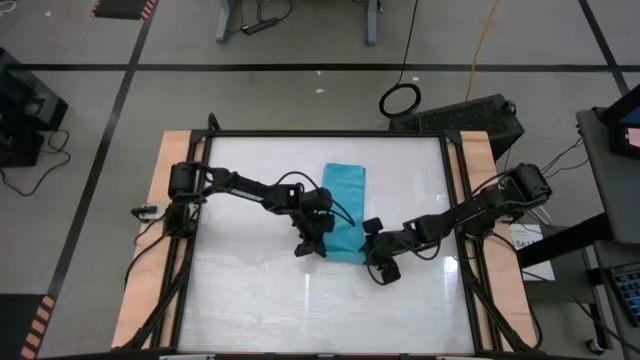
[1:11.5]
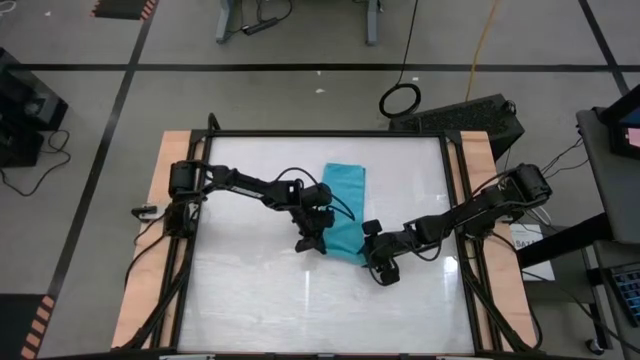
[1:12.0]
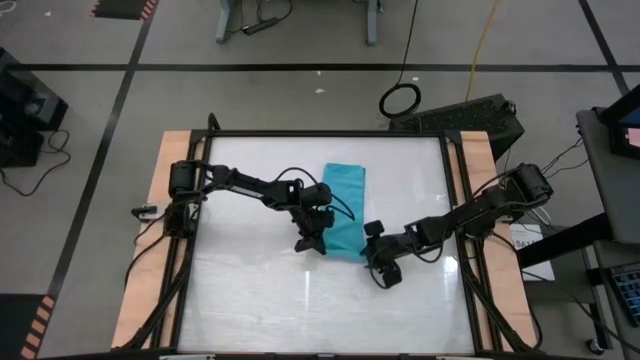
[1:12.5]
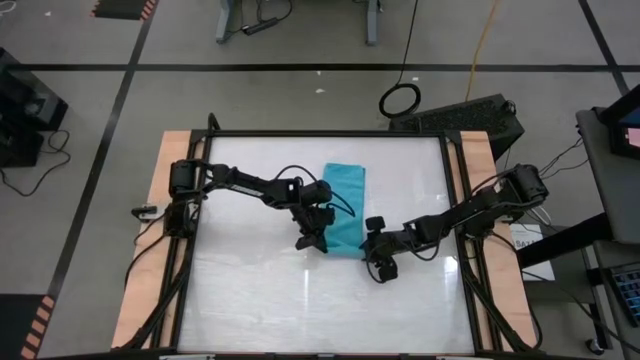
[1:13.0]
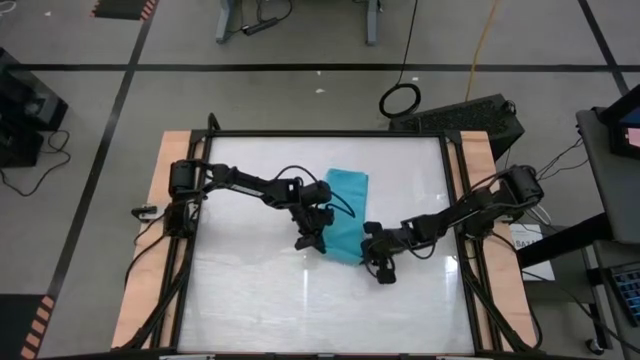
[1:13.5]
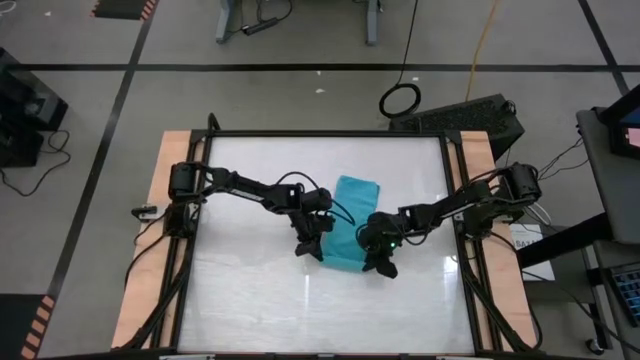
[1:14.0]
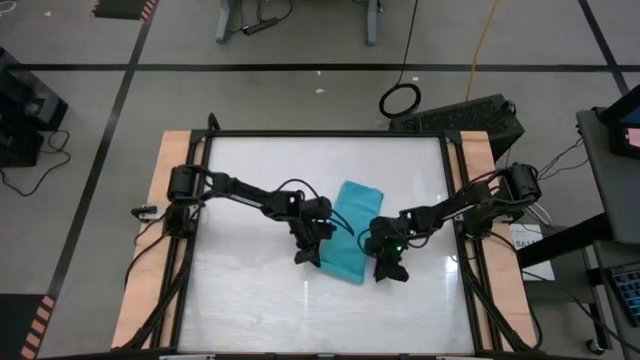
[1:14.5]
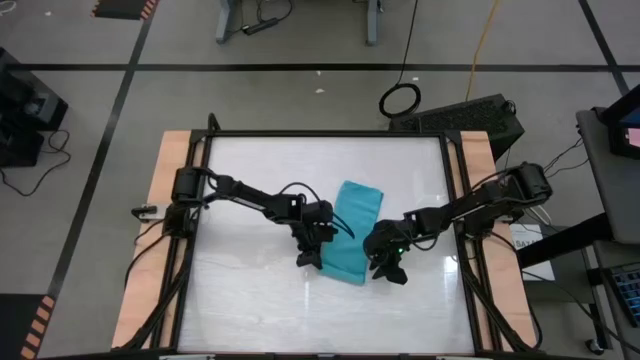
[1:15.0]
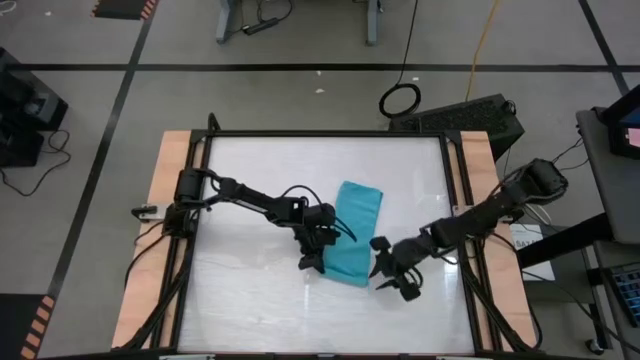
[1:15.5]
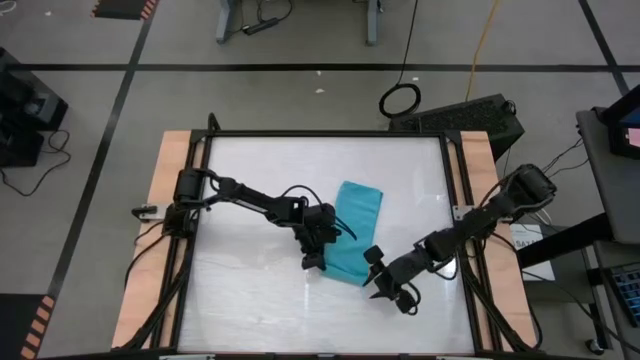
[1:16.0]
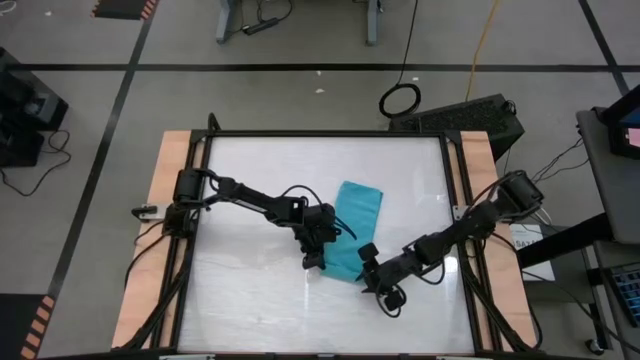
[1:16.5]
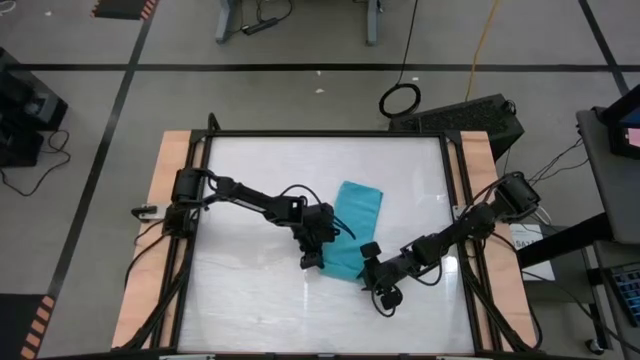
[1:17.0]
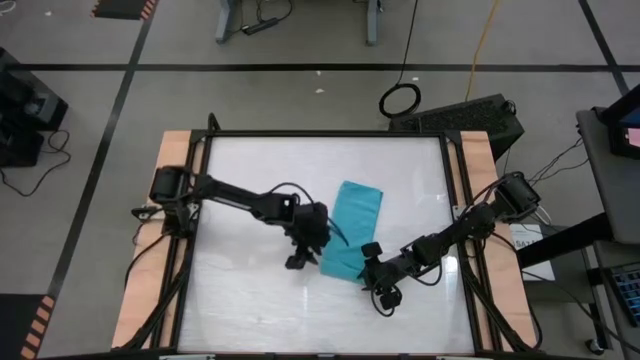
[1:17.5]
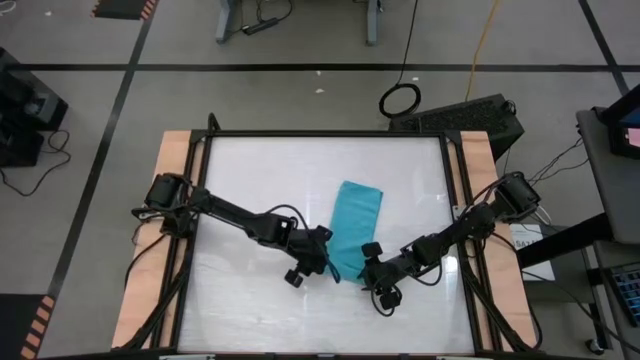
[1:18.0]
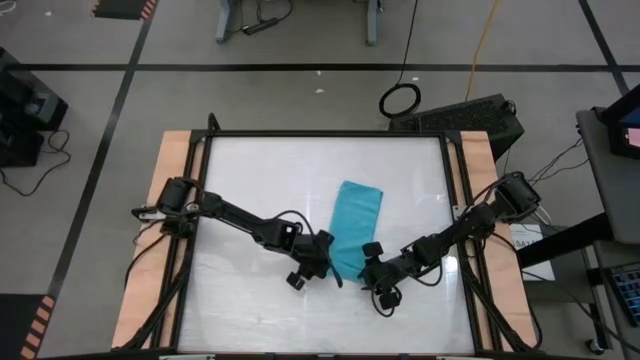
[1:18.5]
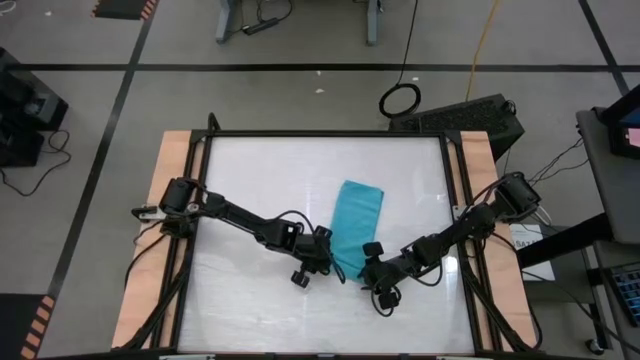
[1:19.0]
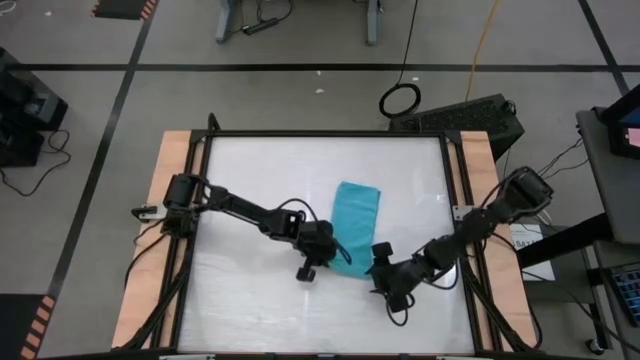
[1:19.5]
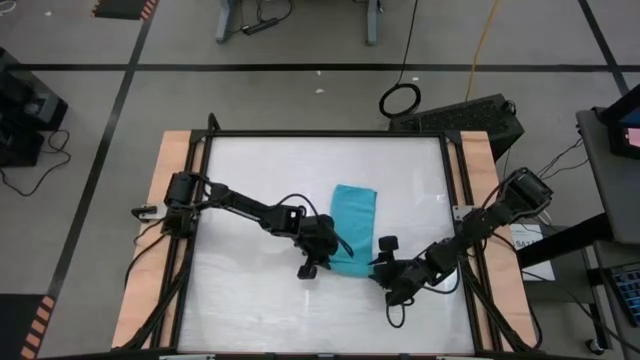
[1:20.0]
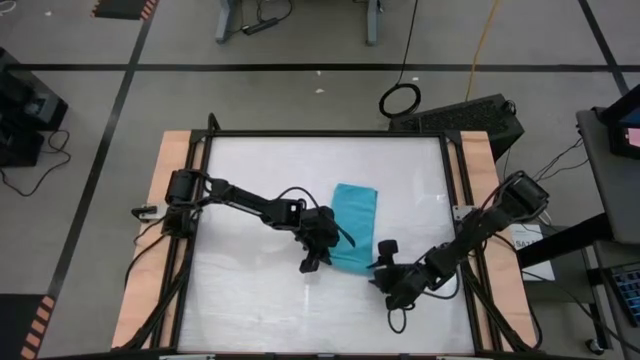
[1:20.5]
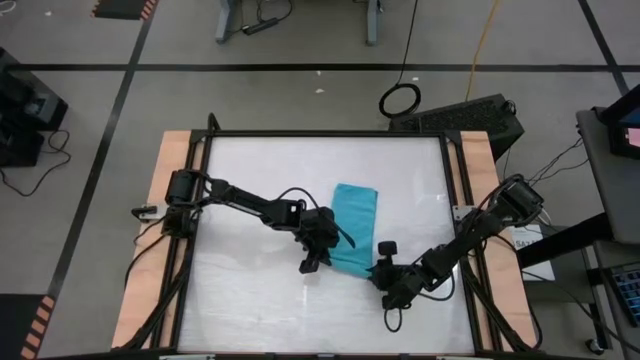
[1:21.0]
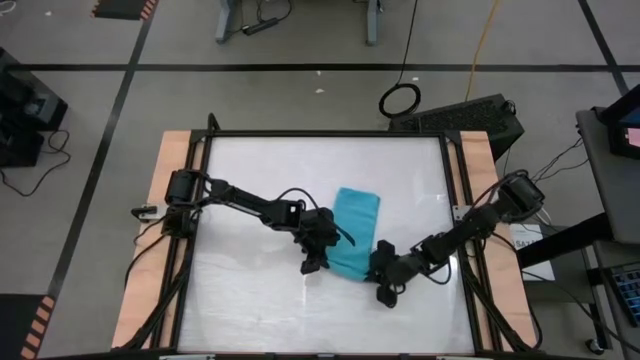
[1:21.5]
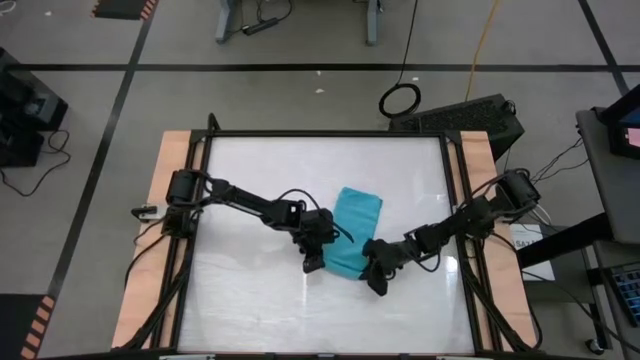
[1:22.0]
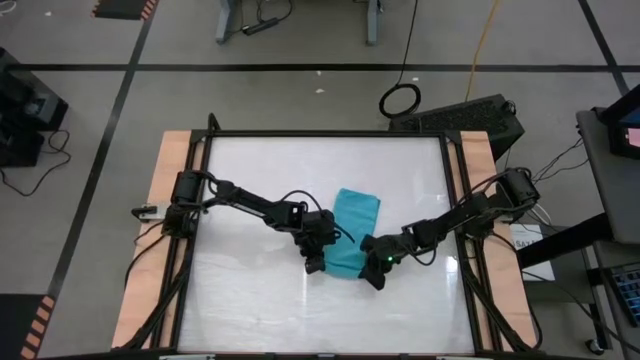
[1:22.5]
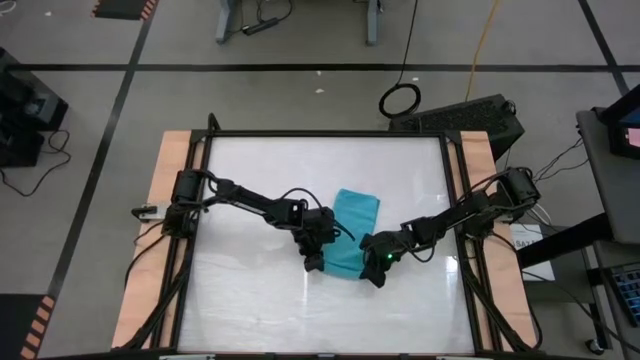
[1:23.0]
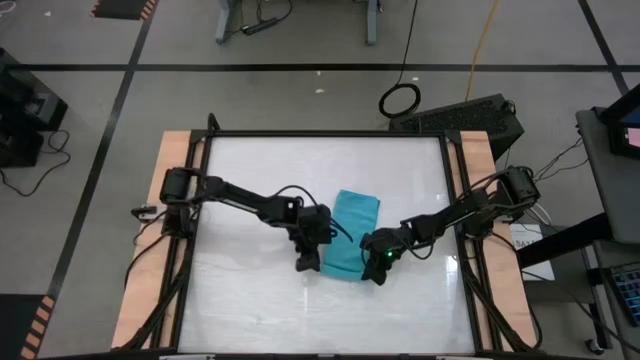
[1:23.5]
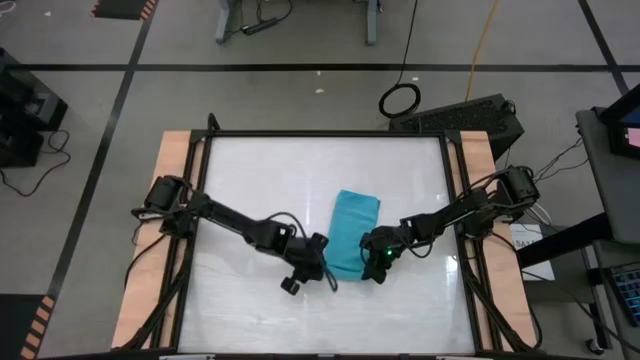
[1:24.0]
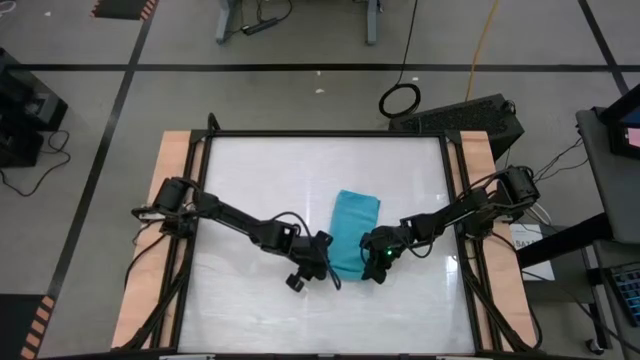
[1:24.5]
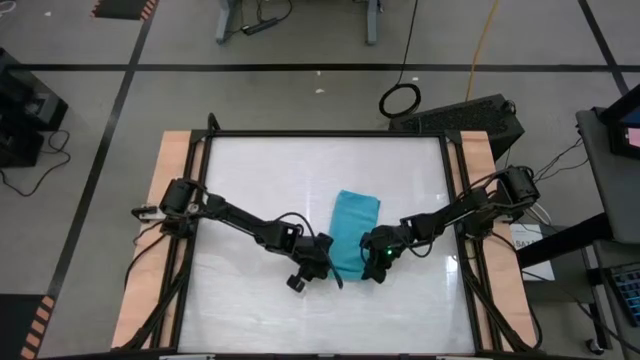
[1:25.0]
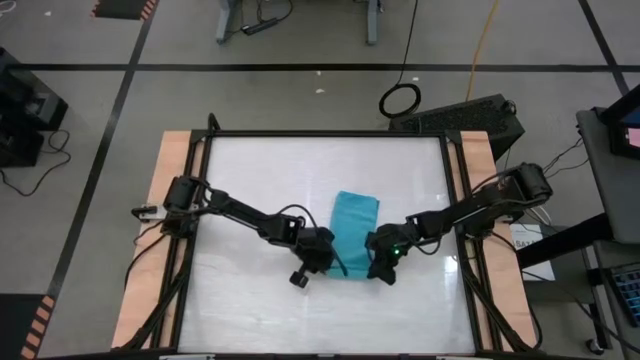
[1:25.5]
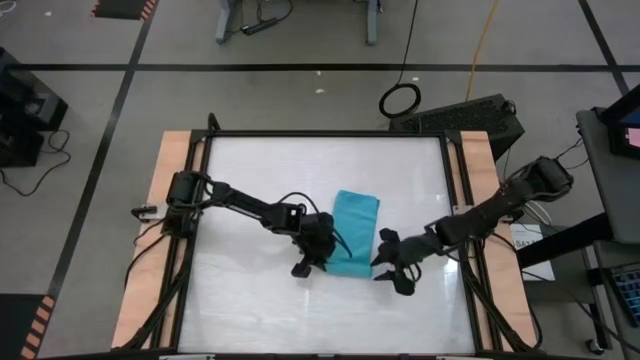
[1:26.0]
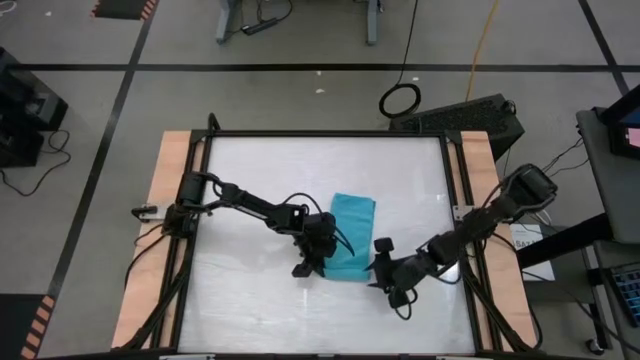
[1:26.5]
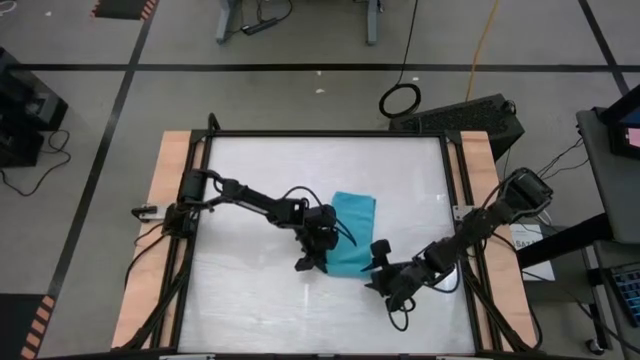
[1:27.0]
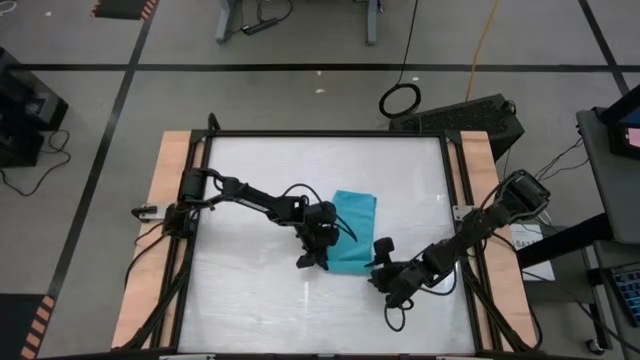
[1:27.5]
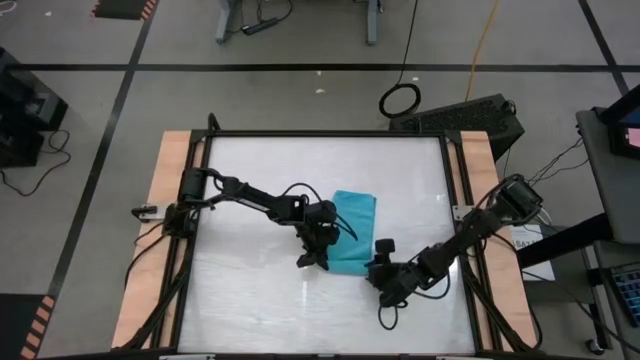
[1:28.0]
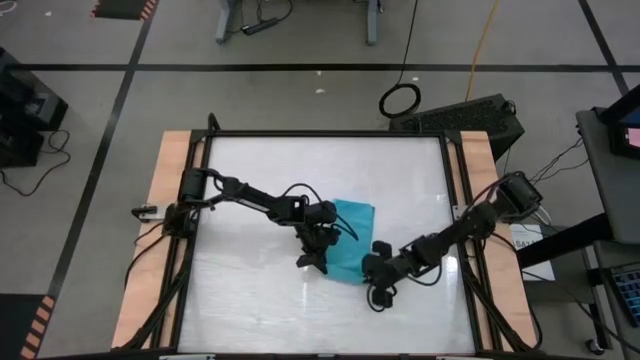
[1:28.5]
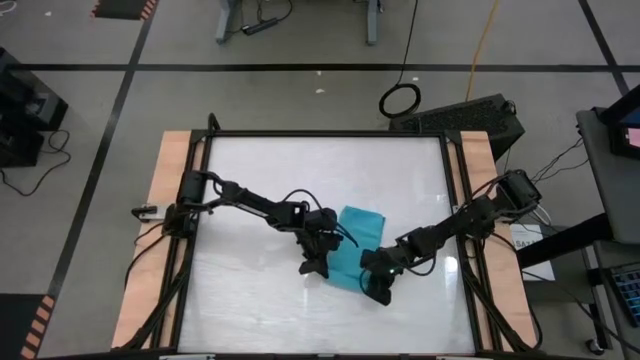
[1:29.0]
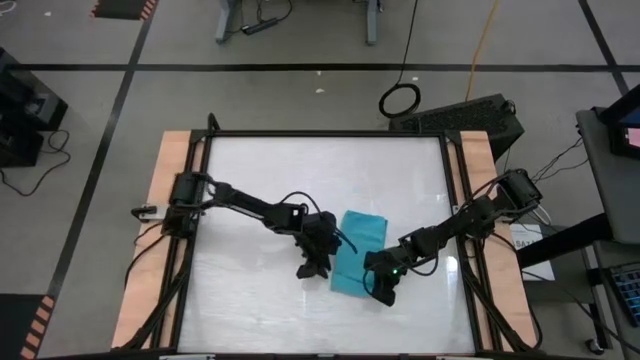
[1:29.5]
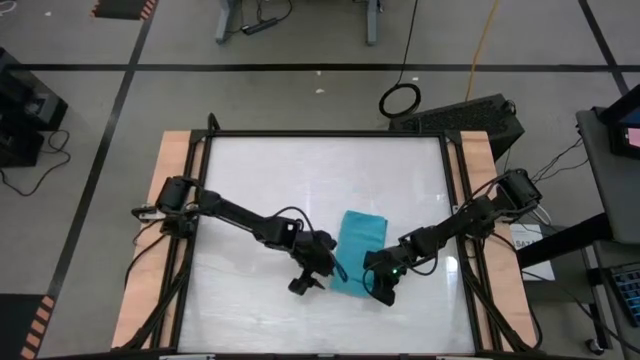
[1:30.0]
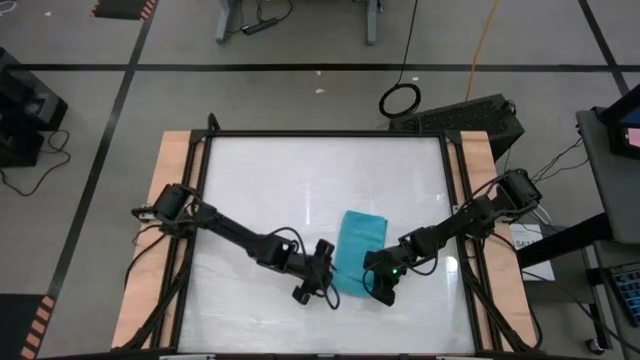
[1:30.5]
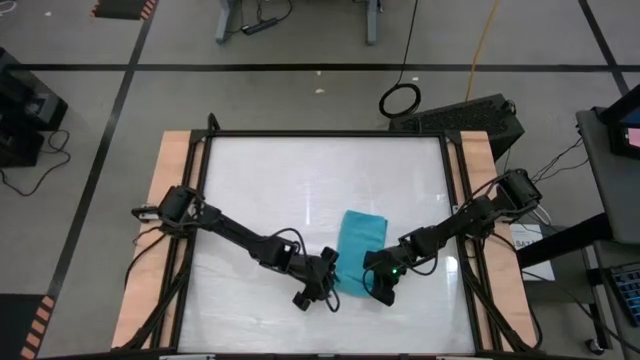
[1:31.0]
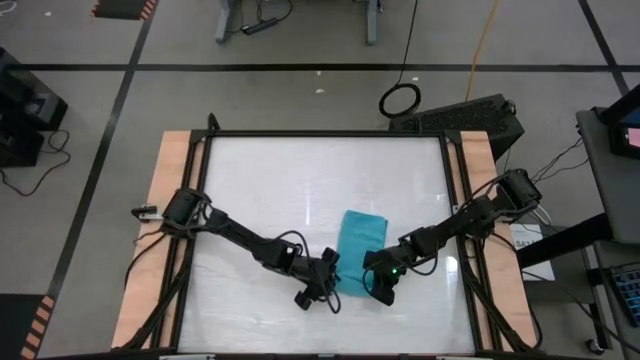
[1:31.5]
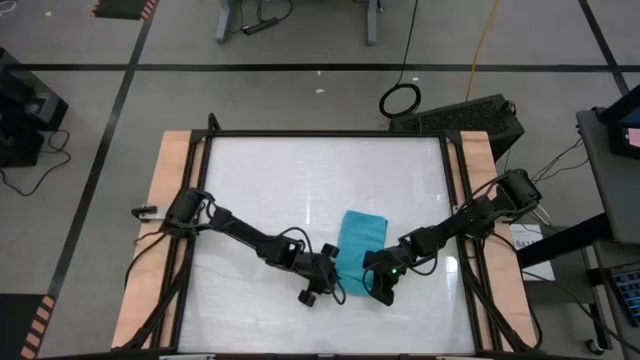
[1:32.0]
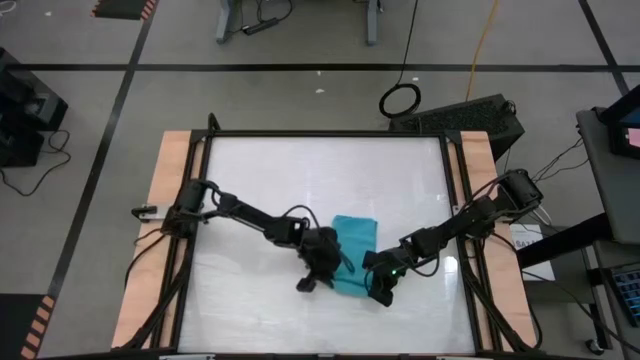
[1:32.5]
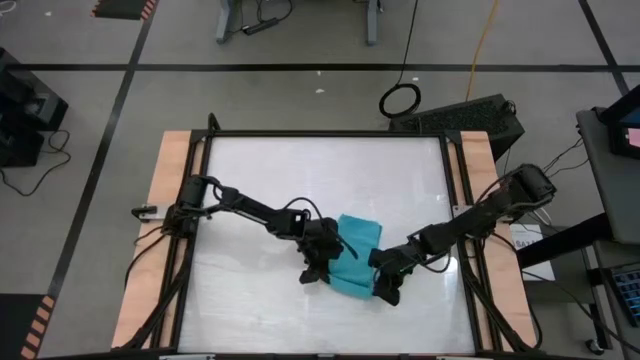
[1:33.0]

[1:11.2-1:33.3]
Task: Roll towel
Roll the blue towel
